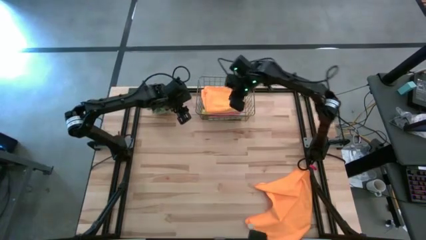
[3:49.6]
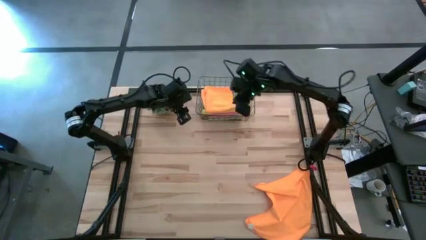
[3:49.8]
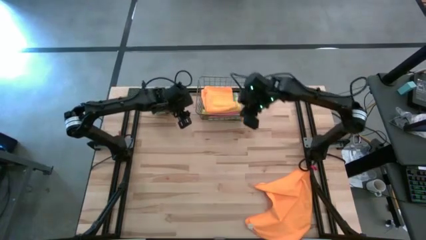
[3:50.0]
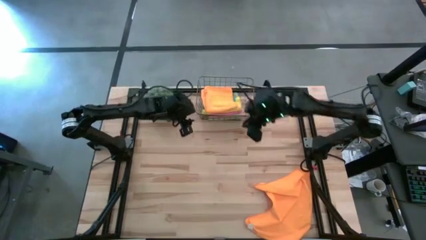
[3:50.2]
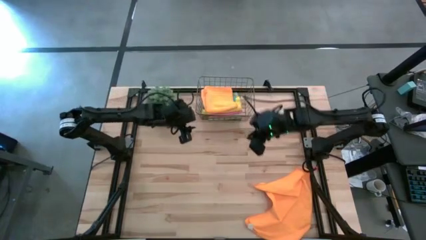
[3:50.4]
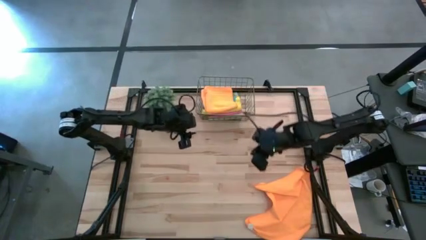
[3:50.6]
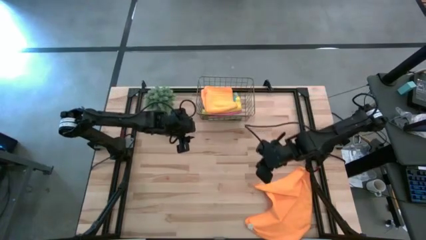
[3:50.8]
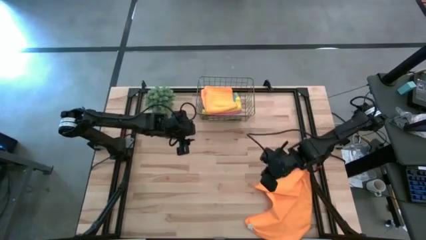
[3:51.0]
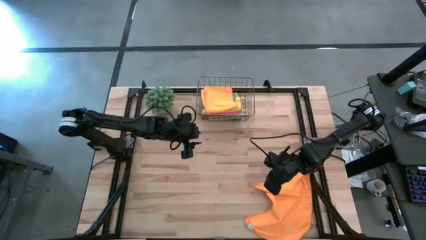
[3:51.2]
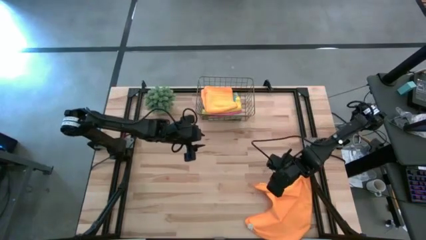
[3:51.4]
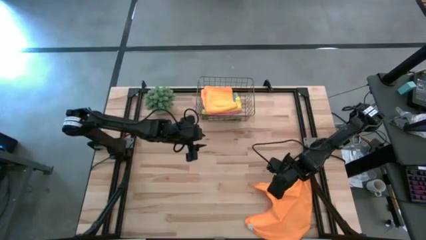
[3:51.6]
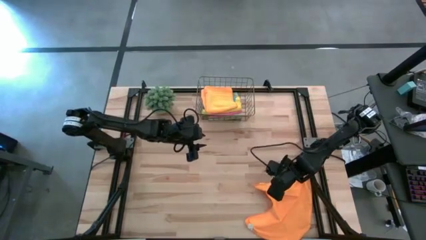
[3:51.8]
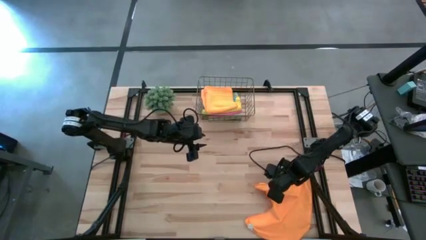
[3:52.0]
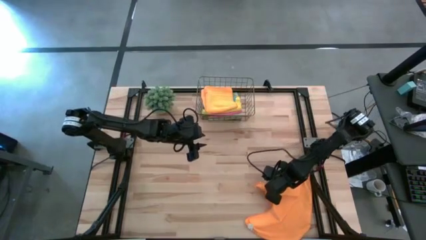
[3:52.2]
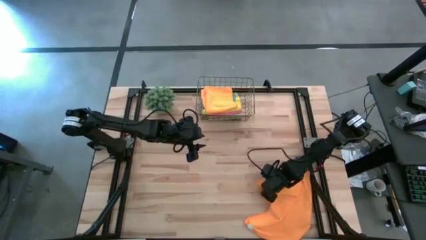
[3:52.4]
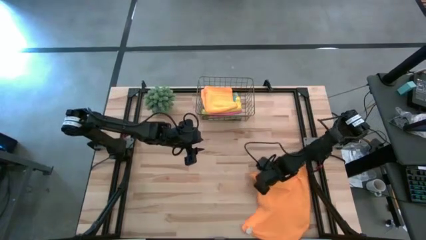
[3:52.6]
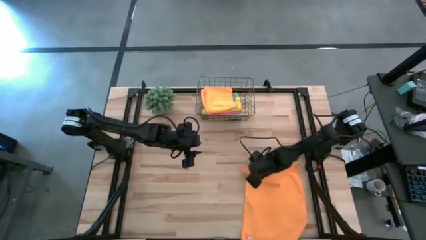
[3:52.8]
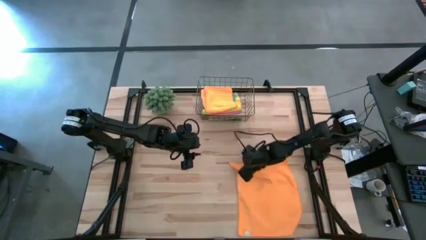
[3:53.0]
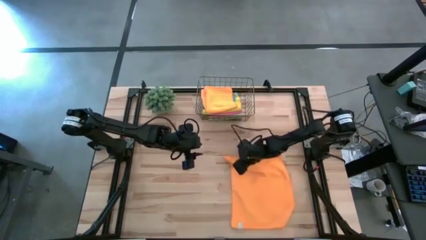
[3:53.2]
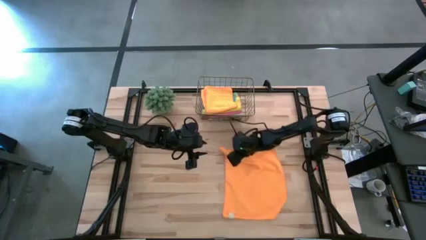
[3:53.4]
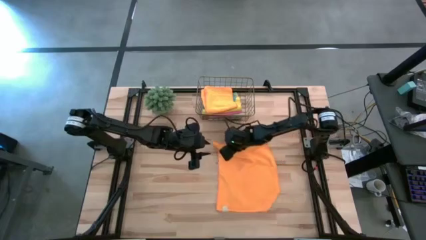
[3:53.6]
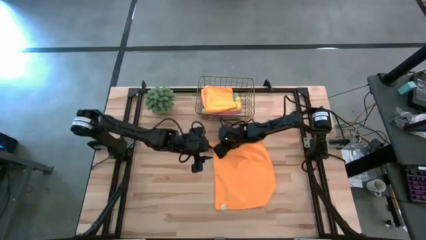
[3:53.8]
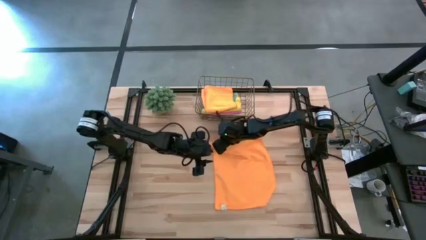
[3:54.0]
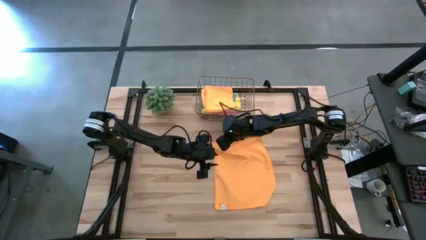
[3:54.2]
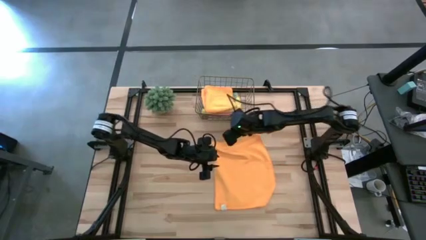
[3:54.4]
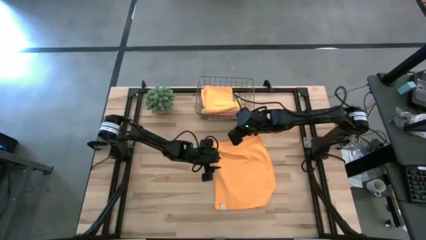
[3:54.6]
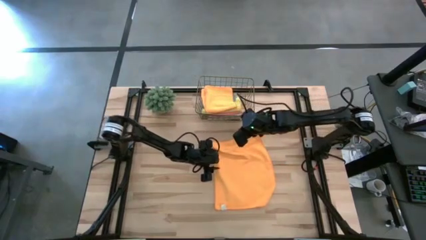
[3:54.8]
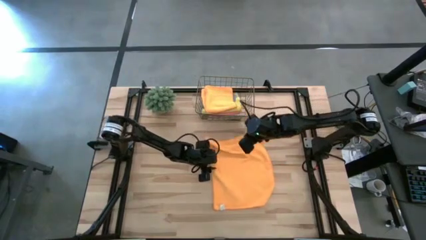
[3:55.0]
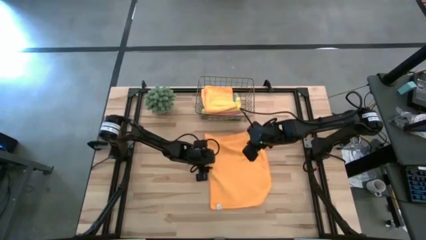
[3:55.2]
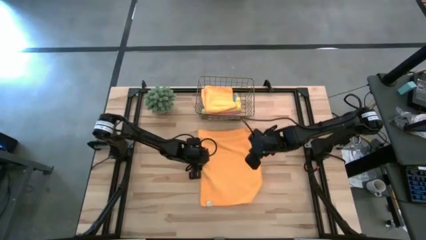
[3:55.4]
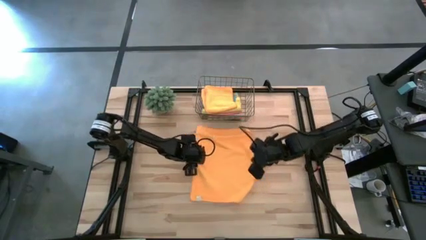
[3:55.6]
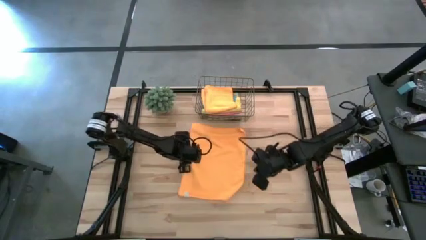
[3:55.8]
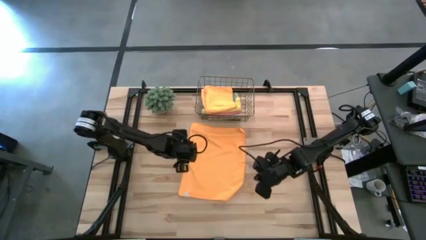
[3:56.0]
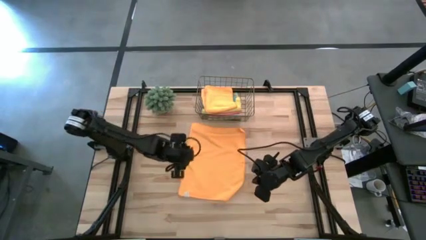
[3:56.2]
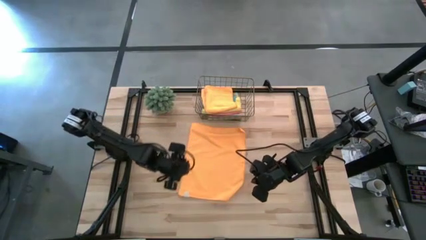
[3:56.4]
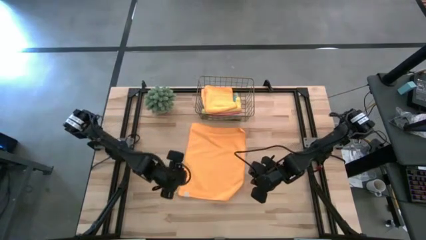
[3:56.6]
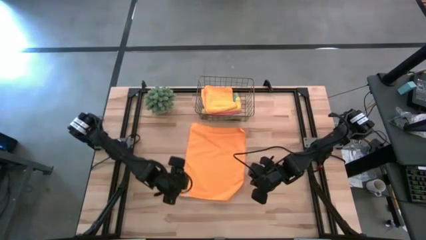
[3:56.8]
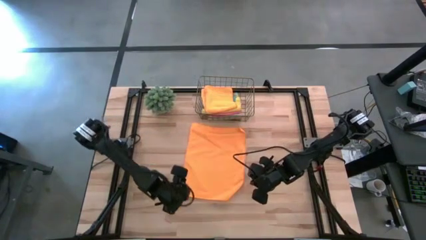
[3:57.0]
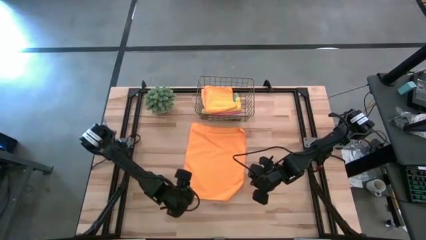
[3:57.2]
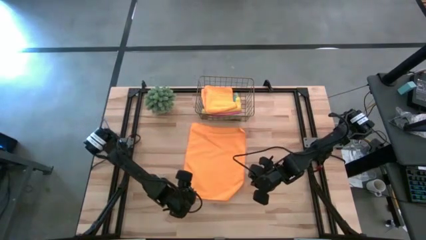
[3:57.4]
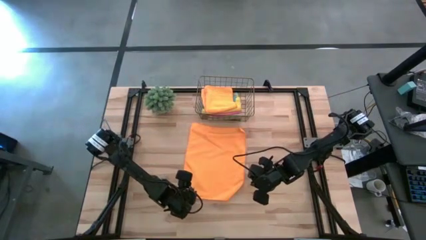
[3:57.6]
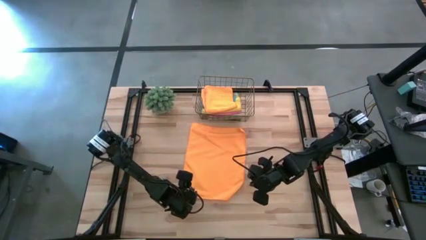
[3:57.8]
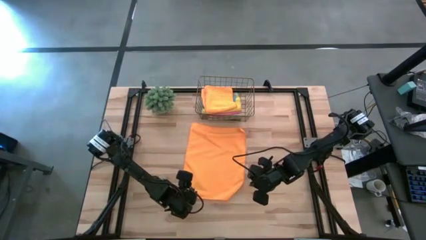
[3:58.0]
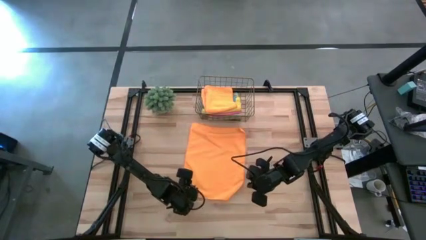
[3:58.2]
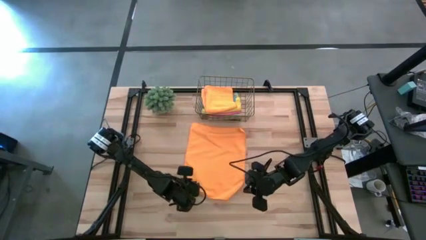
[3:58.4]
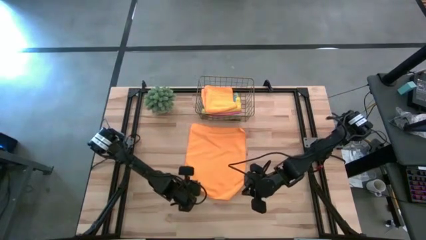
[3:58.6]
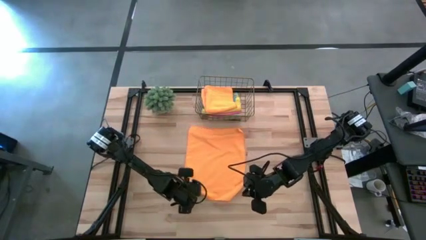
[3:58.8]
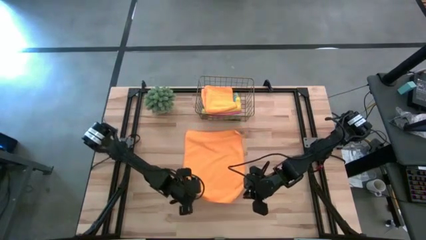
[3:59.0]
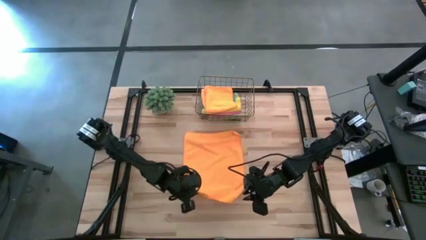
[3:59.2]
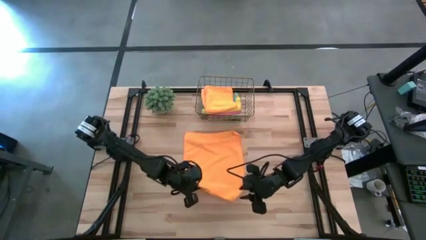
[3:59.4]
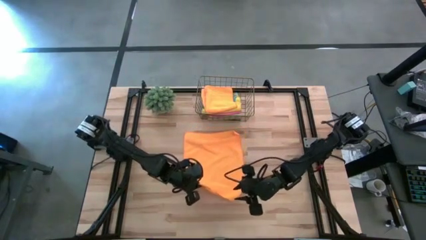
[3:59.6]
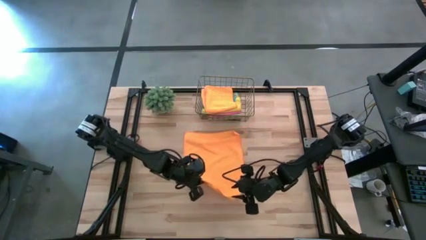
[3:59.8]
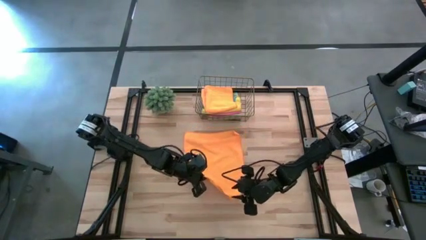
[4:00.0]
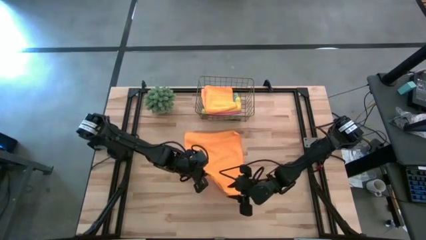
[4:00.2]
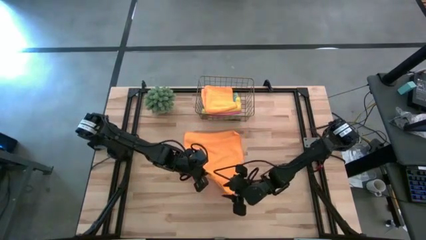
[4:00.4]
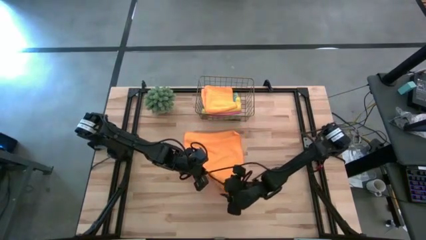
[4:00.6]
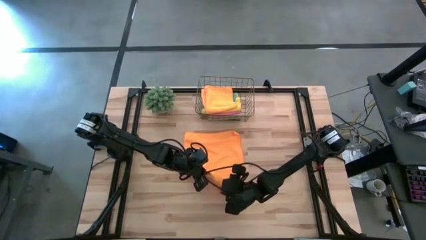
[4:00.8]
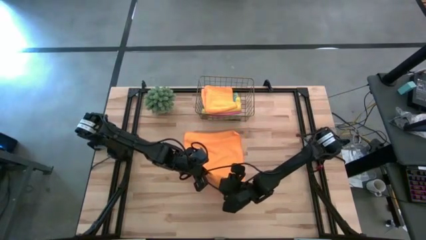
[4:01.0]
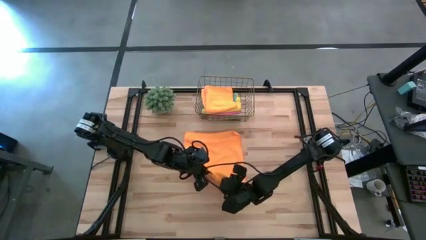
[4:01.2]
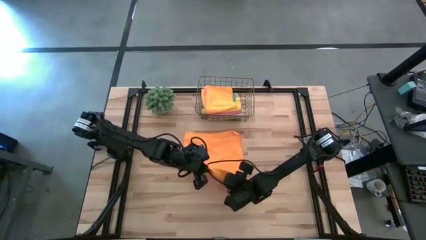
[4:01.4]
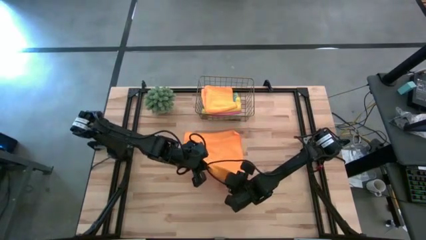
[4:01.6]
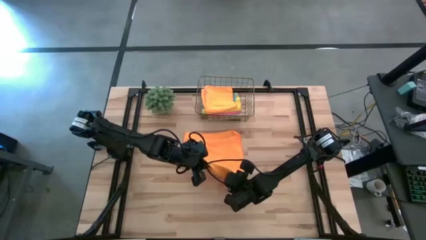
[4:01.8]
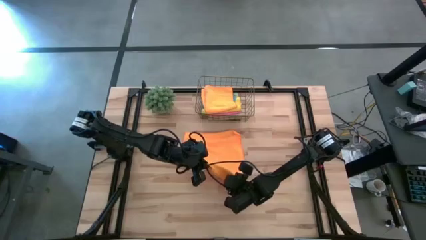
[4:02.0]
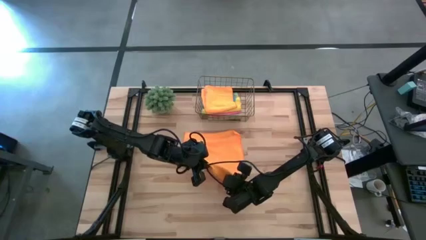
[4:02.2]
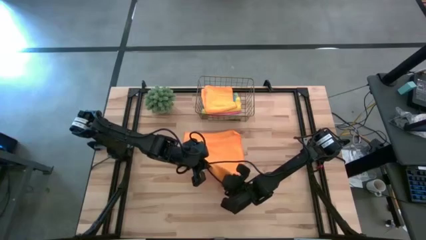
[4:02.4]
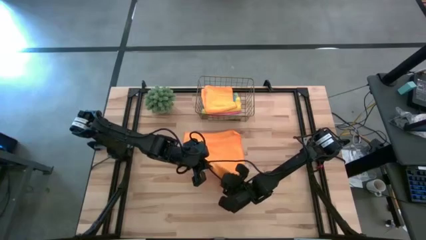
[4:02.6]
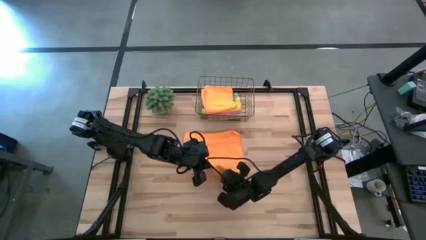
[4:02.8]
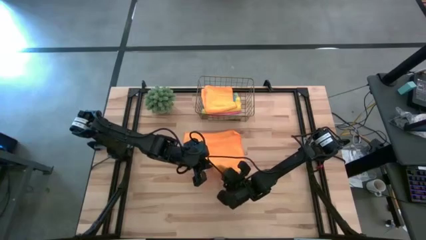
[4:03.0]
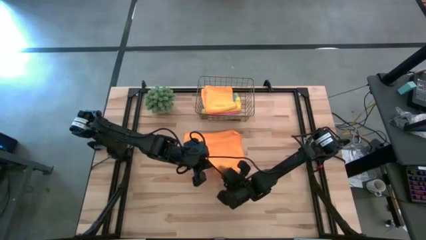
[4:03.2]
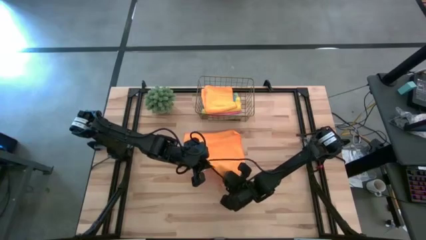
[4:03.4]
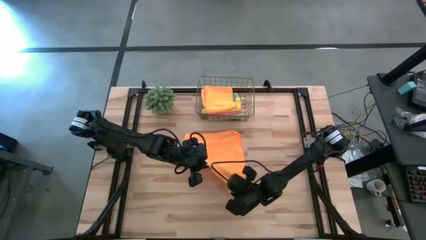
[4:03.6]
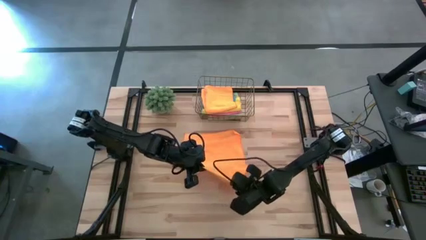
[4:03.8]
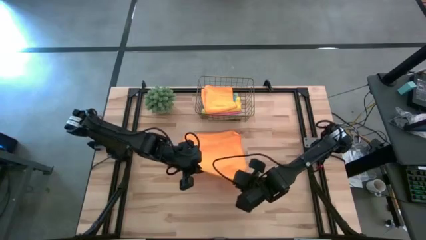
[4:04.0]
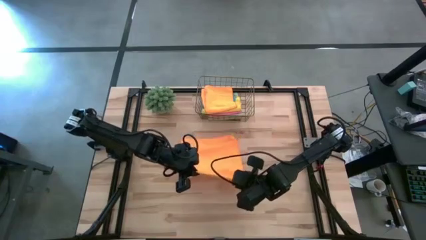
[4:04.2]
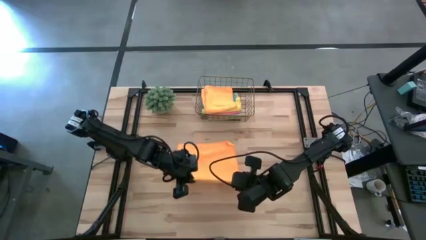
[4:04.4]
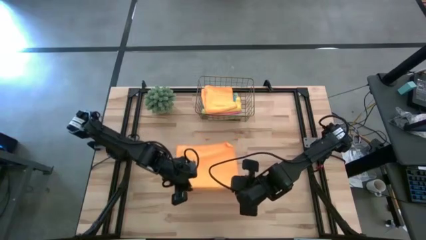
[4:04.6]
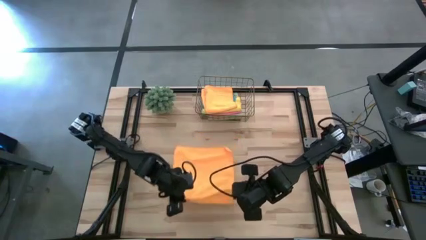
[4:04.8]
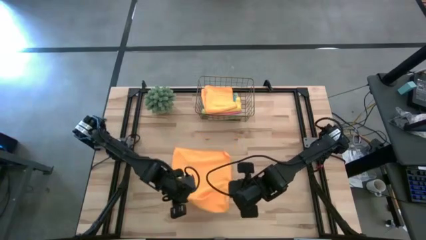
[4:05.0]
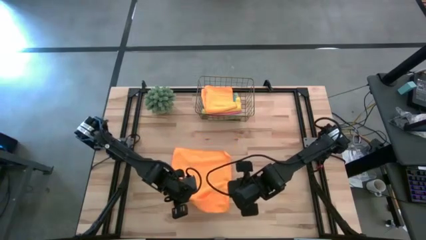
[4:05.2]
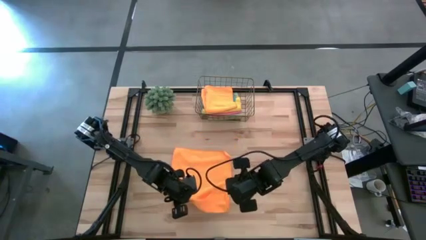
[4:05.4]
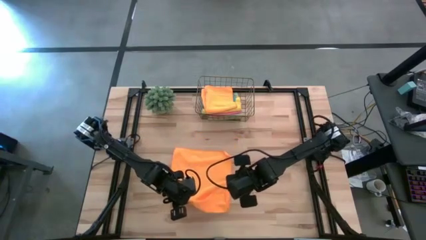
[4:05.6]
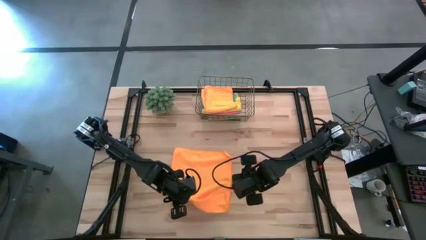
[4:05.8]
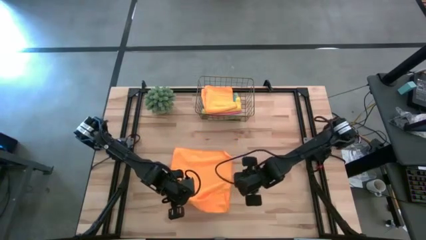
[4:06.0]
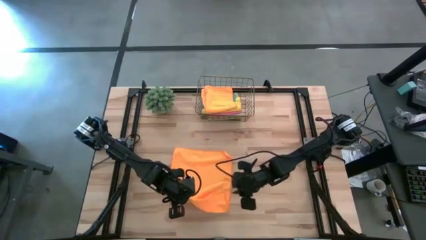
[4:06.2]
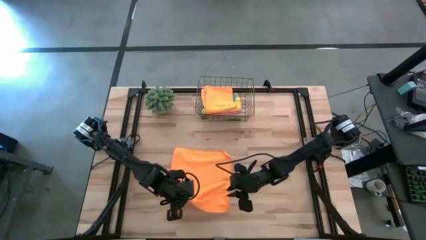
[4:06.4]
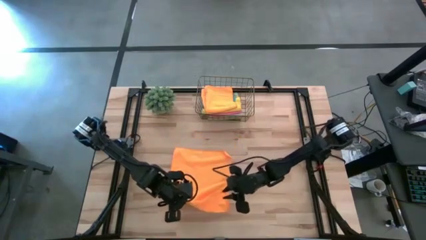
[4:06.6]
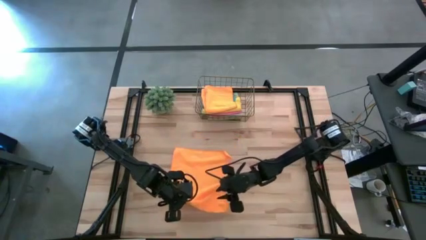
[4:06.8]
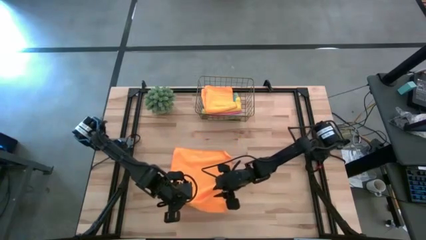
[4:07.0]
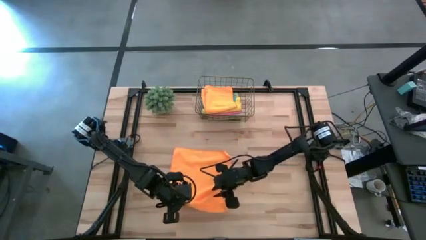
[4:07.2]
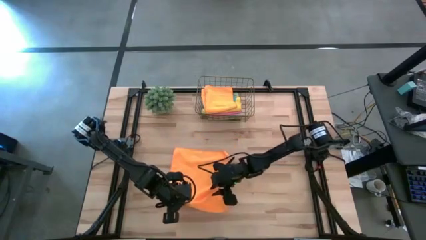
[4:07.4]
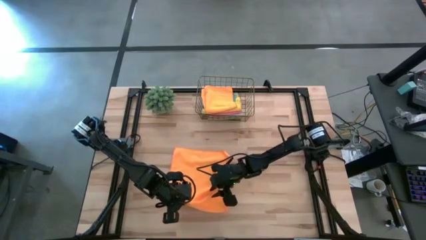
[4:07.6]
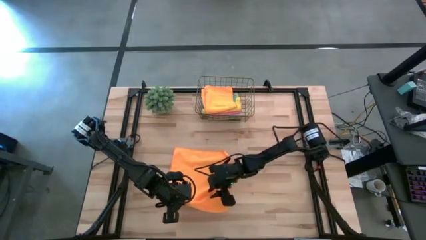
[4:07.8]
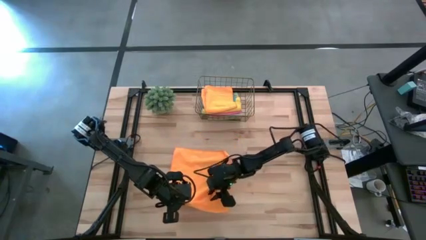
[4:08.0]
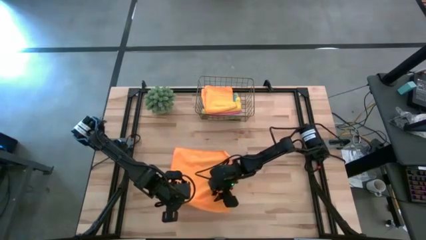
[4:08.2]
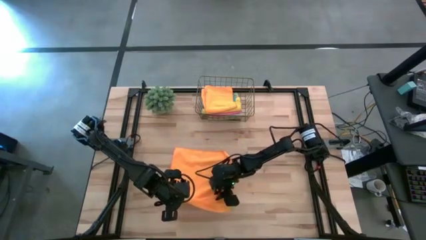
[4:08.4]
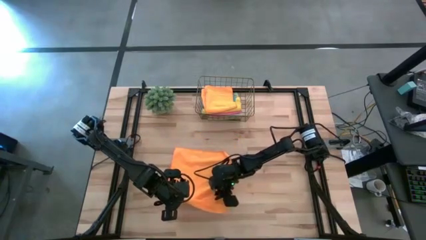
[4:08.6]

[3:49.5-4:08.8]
Task: Fold microfiber towels
Fold the orange towel
